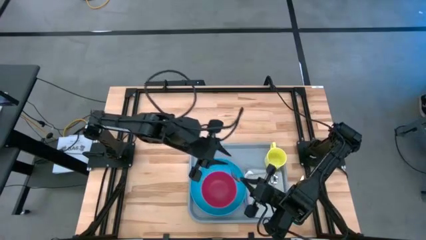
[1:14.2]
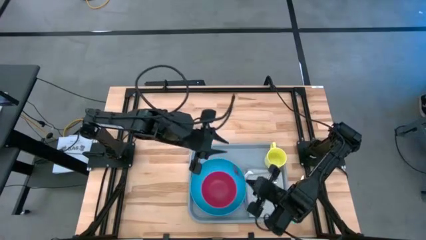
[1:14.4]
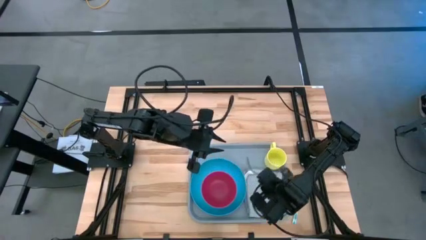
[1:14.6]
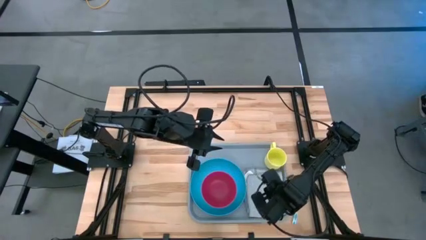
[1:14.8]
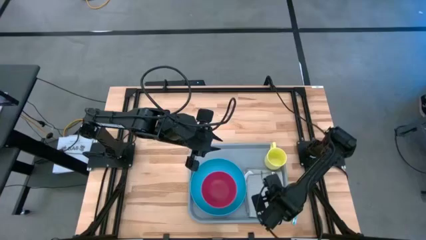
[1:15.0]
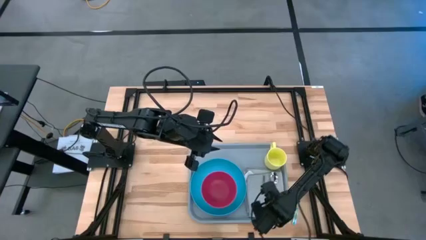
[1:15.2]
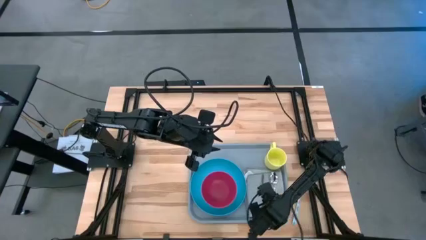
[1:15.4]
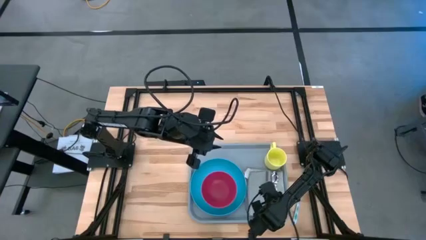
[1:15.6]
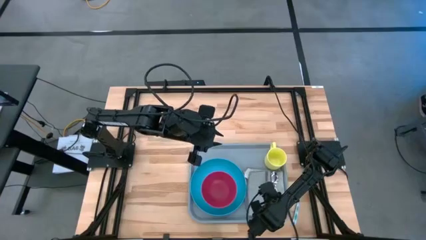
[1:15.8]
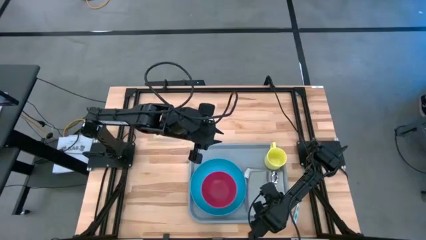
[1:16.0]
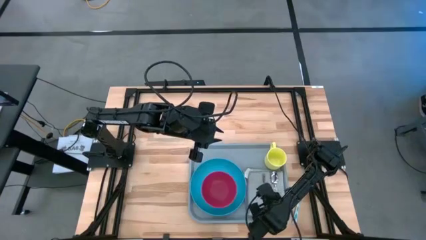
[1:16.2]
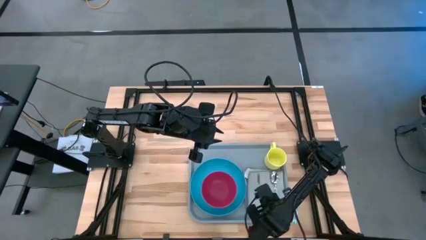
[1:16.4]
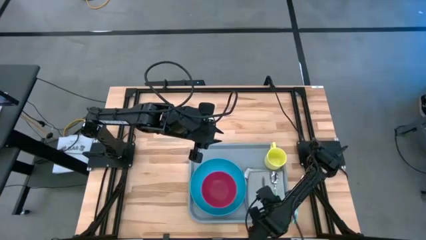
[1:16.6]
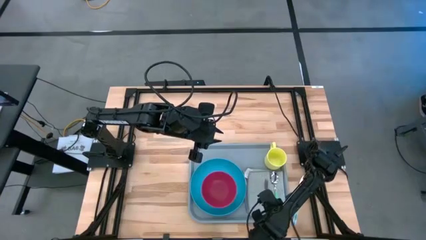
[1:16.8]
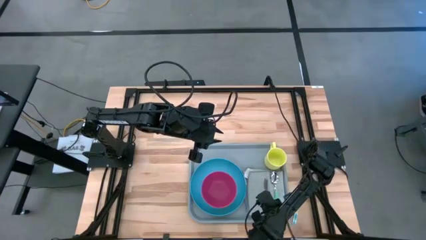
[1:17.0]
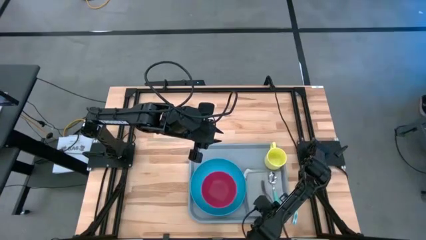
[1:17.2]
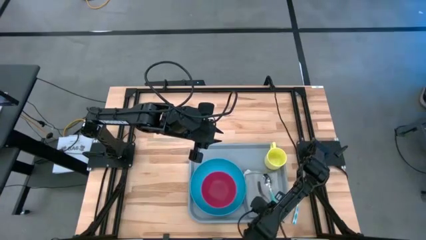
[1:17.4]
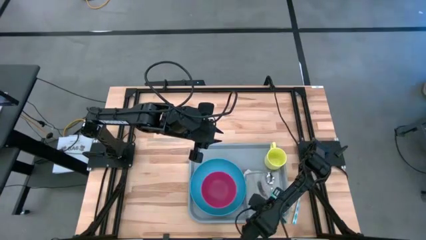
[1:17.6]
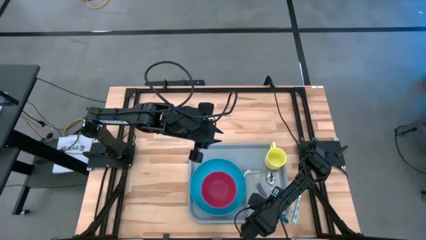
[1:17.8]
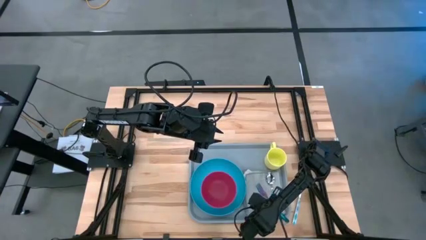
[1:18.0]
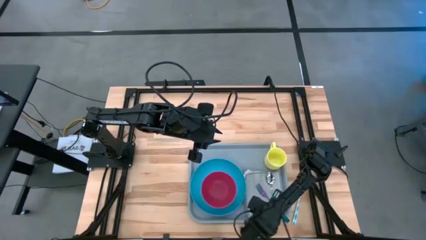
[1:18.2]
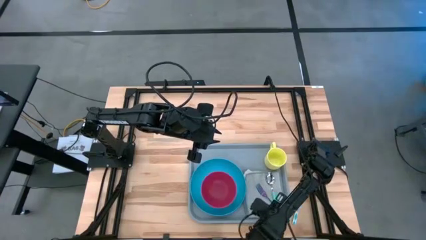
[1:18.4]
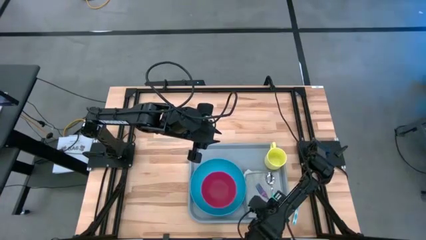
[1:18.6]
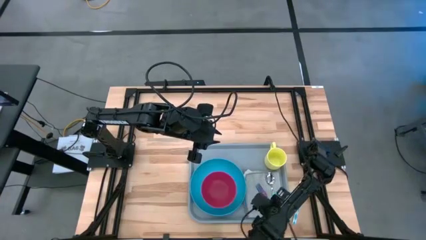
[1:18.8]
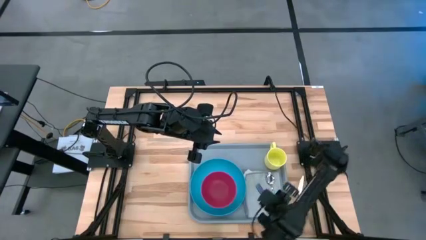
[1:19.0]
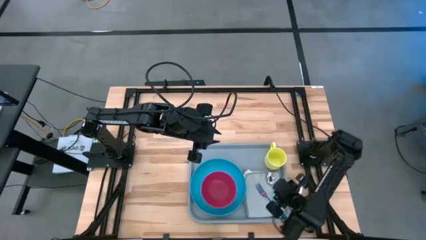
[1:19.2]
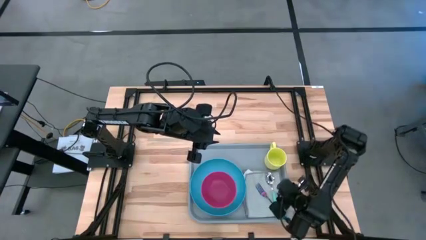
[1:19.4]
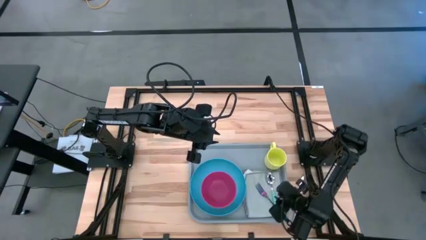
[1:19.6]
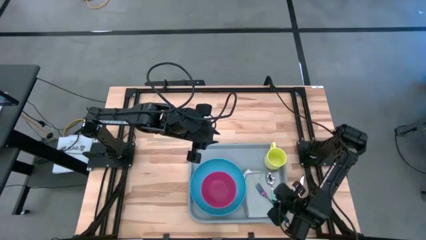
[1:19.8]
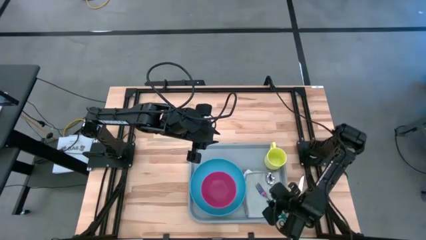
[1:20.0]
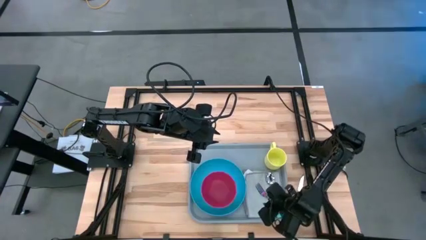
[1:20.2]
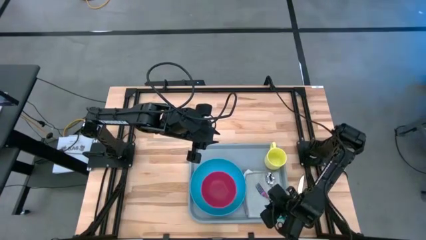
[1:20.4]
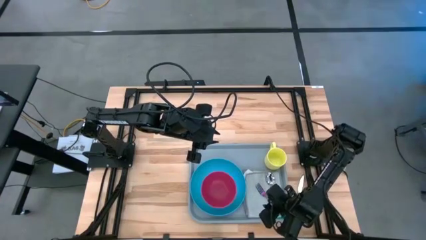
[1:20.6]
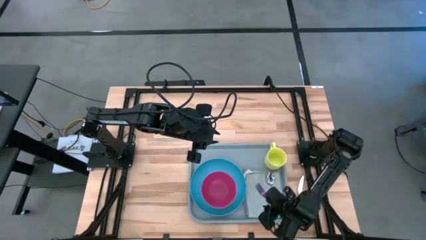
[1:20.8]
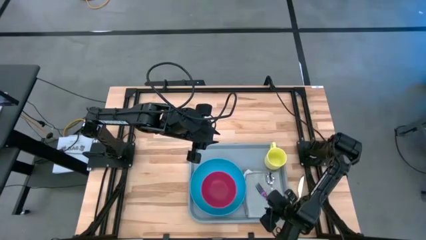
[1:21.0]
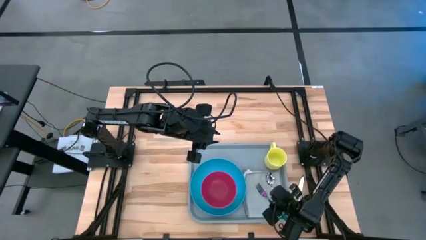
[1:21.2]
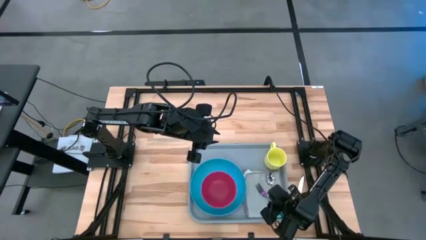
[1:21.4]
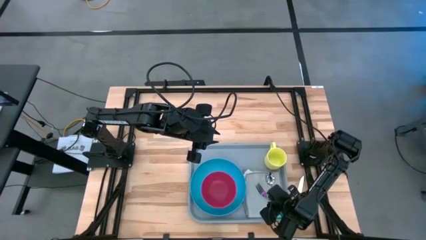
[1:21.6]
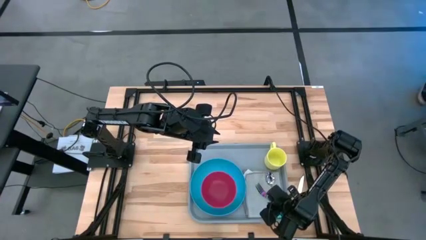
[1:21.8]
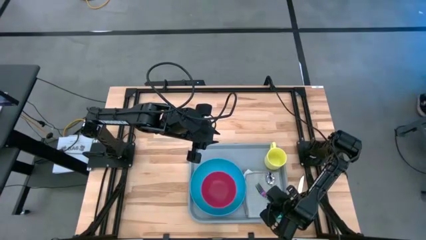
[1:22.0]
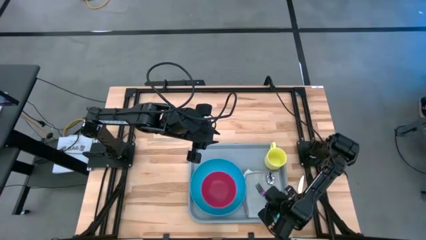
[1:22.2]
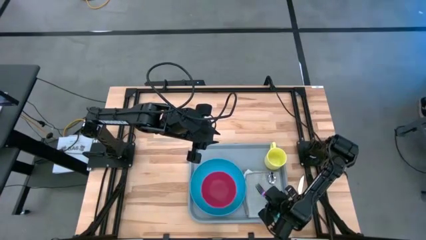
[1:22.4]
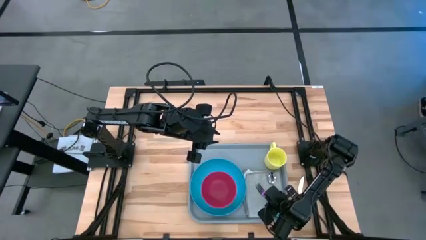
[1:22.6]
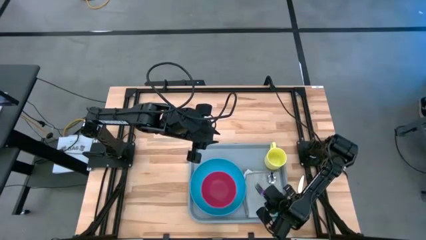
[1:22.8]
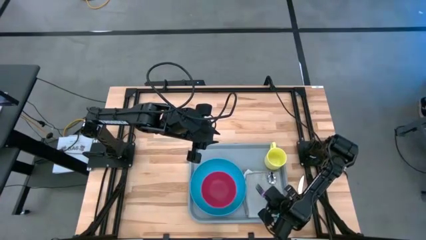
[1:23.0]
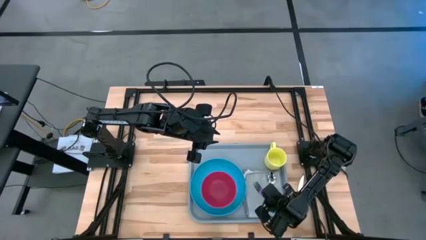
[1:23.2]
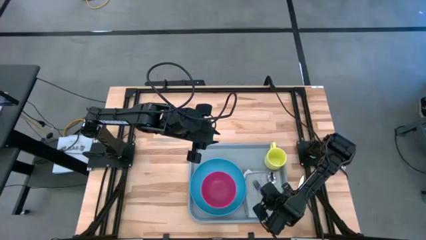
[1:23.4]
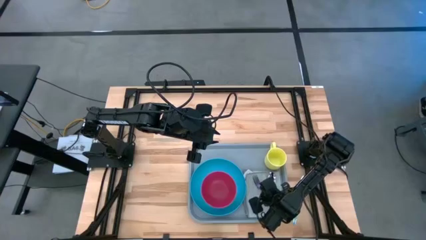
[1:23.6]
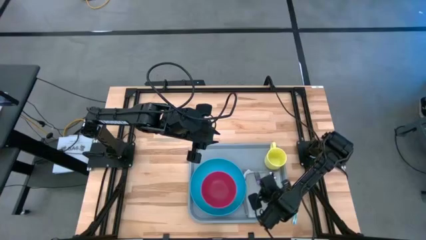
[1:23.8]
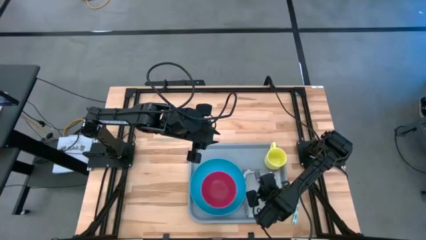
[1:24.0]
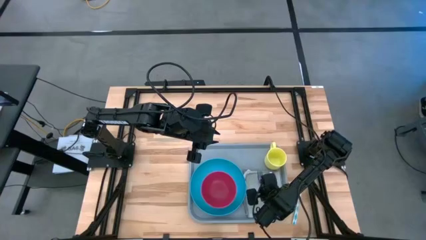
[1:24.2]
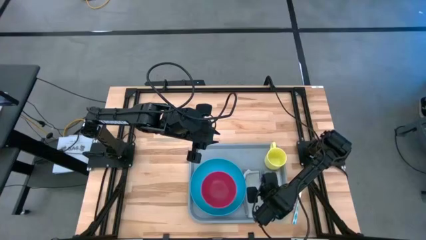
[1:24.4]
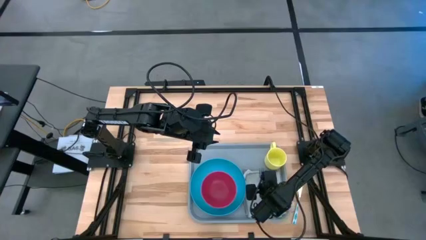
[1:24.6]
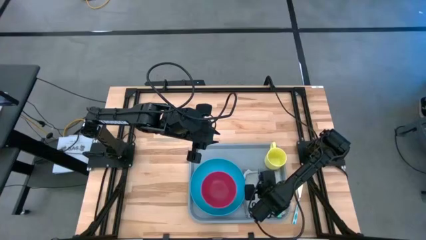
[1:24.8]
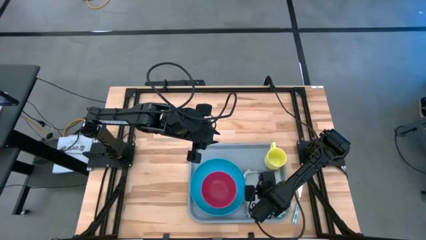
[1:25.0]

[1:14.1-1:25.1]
Task: Set up tray
Put the purple fork to the left of the blue spoon on the gray table napkin

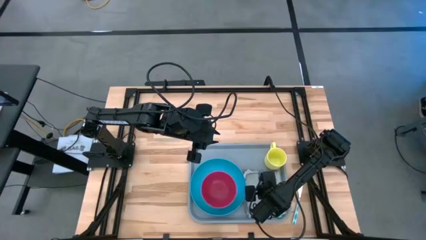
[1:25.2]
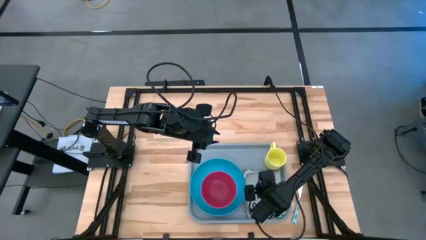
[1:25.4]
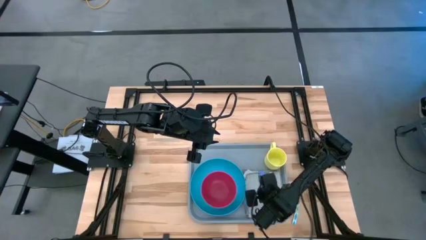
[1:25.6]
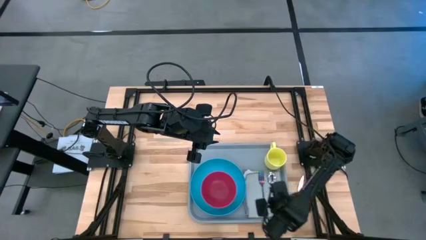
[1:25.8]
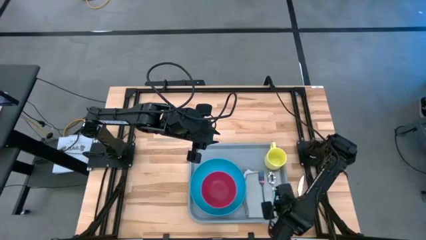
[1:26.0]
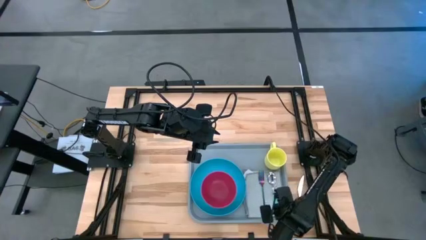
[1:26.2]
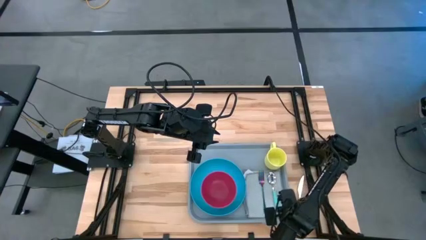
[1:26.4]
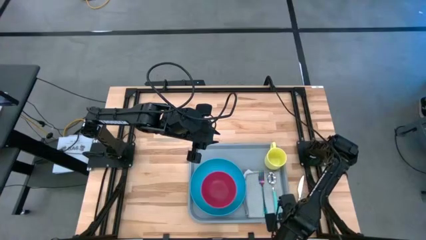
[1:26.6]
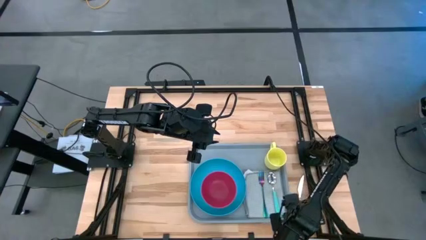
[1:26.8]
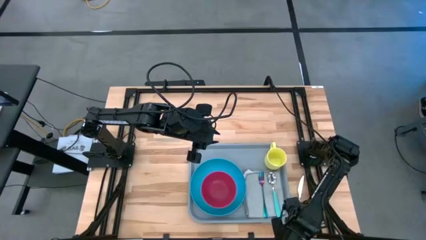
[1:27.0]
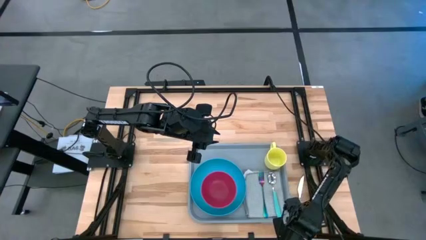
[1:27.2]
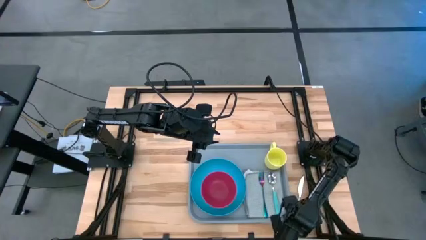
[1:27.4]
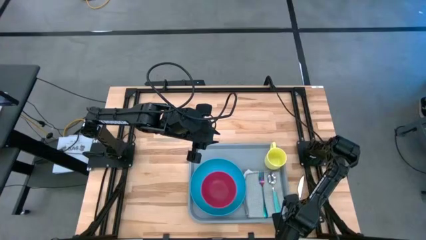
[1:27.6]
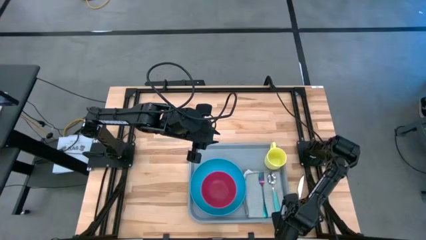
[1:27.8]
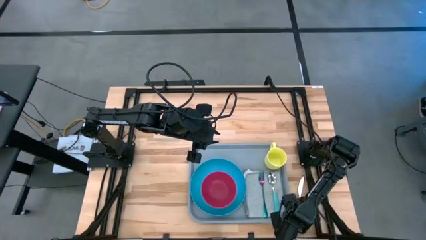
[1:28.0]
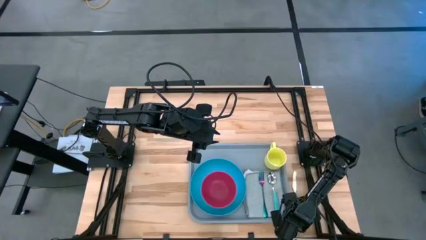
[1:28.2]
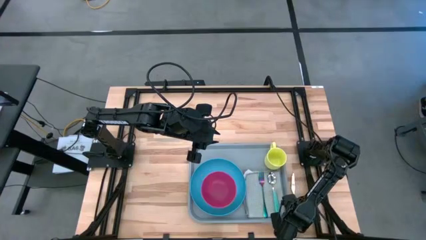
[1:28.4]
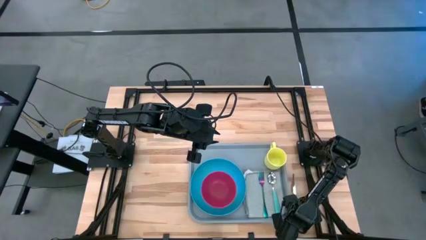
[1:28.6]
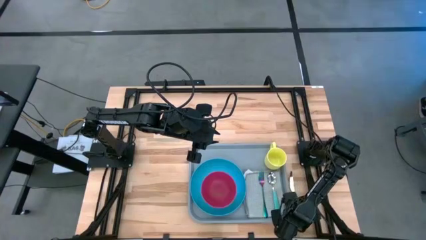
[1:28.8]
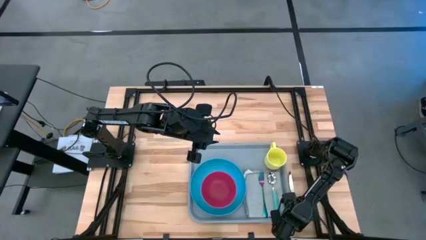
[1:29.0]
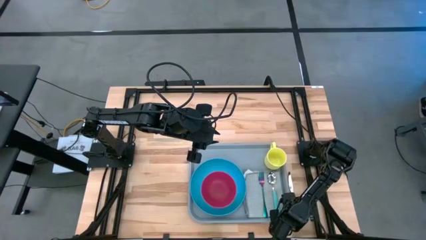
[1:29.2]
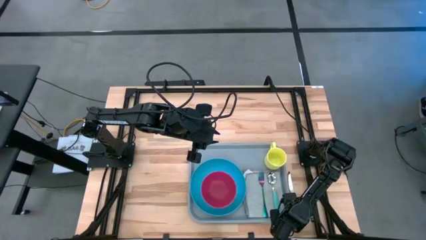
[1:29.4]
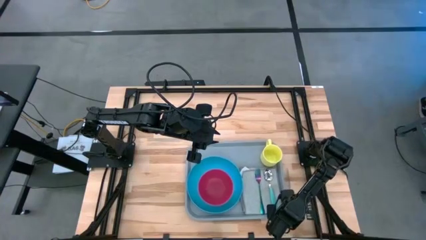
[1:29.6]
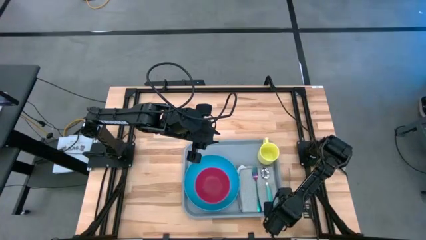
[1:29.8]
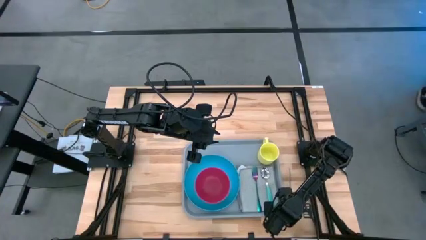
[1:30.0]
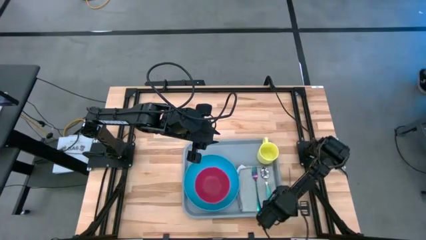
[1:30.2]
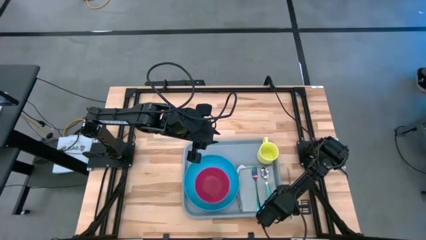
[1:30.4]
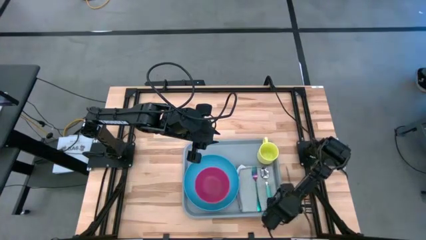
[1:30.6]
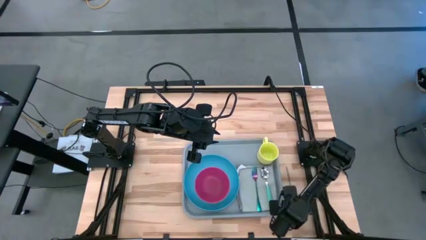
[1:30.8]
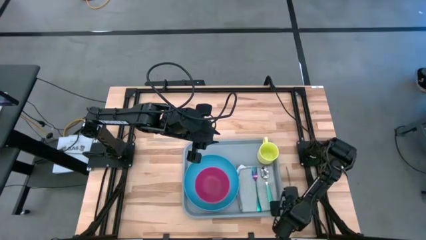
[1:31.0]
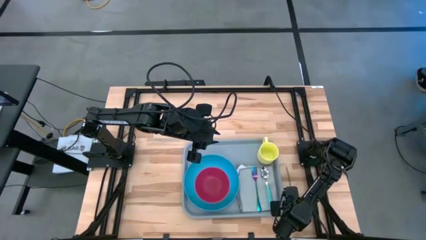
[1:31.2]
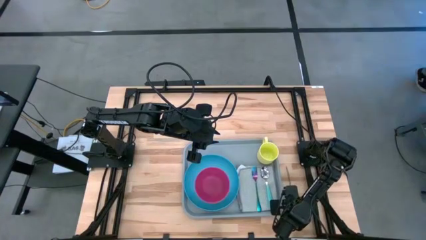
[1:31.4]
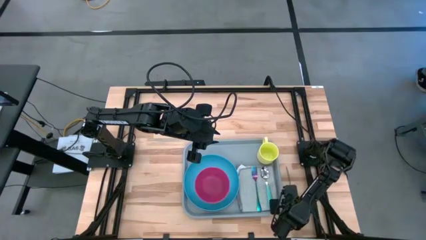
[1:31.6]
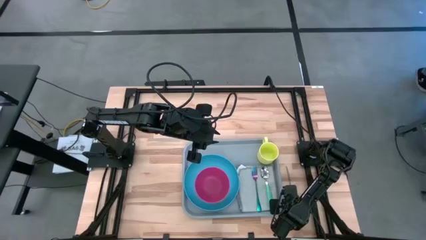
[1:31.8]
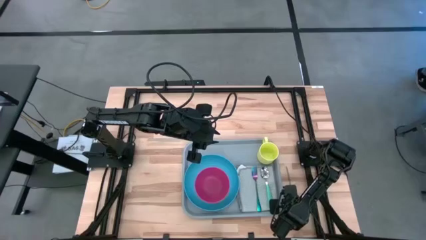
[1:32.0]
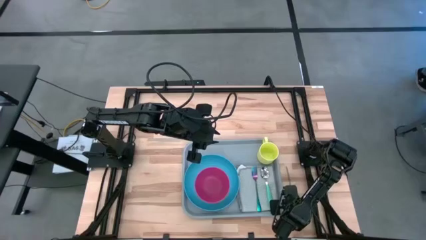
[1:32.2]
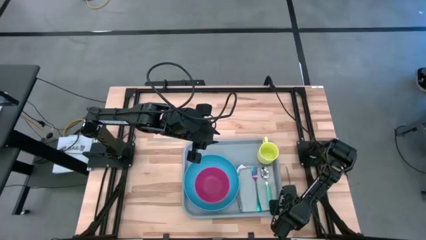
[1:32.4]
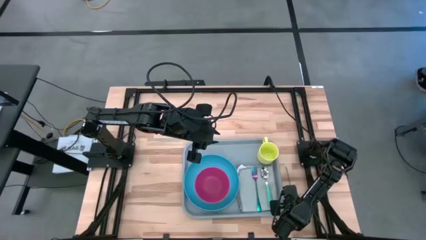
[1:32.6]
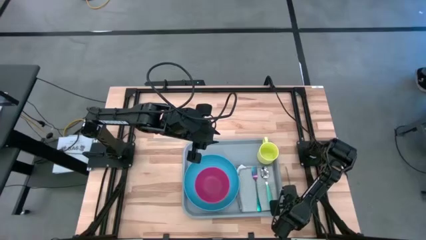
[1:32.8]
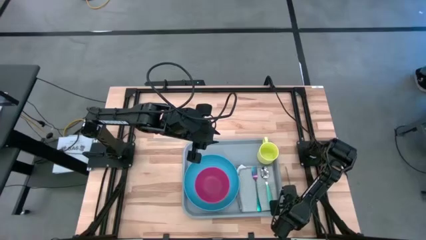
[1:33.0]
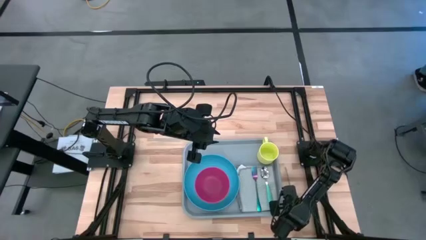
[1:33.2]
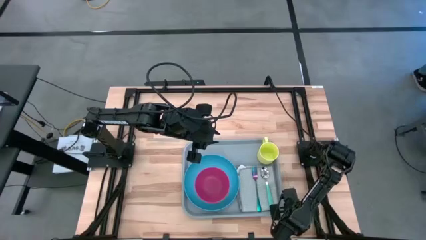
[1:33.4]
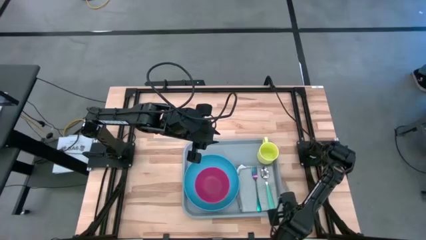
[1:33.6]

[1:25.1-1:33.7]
Put the blue knife to the left of the purple fork on the gray table napkin
